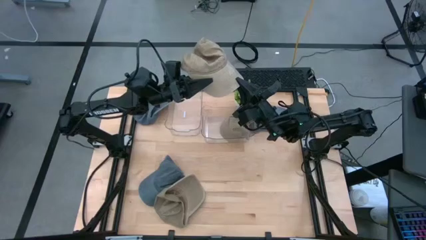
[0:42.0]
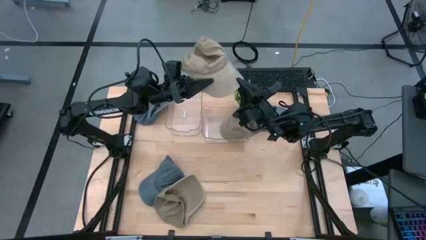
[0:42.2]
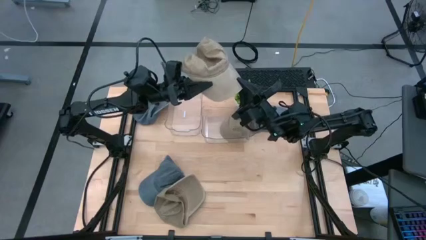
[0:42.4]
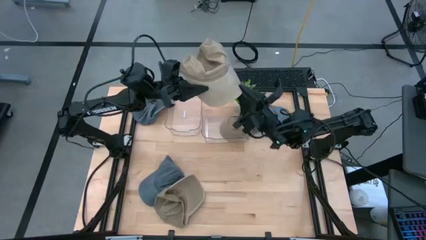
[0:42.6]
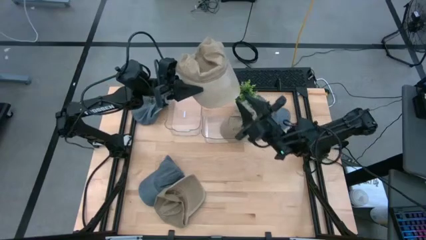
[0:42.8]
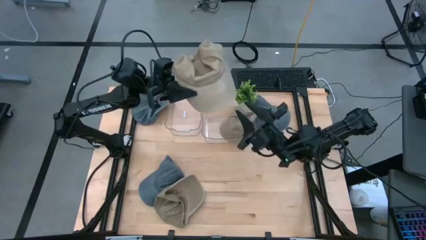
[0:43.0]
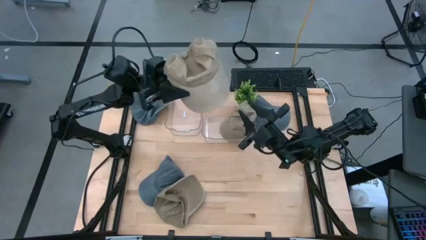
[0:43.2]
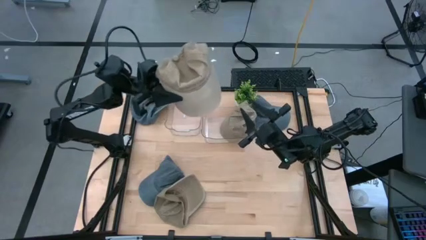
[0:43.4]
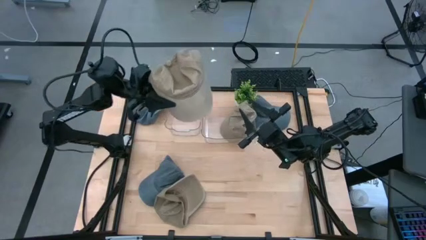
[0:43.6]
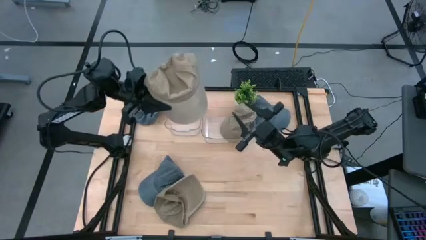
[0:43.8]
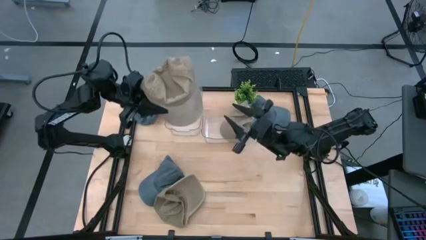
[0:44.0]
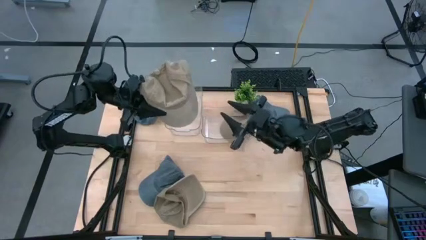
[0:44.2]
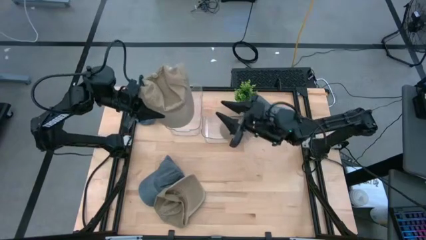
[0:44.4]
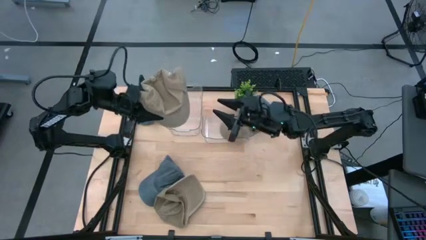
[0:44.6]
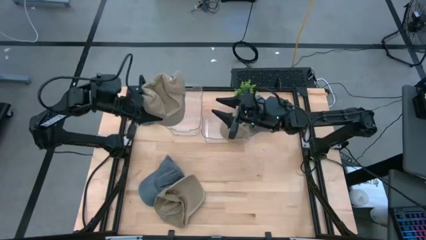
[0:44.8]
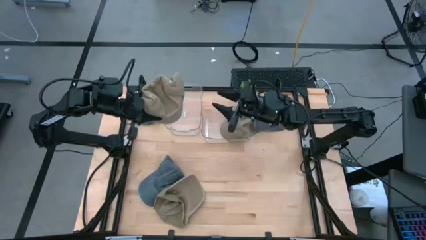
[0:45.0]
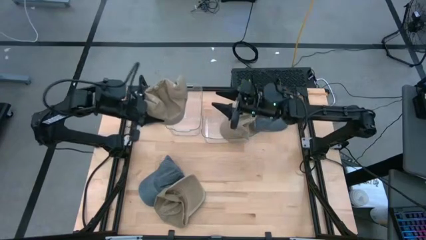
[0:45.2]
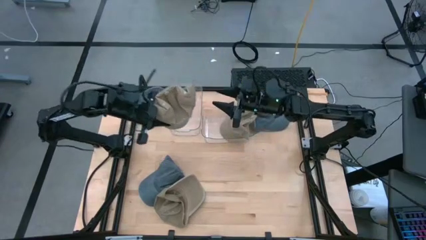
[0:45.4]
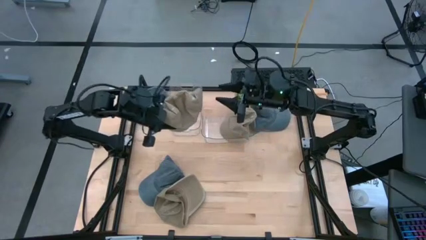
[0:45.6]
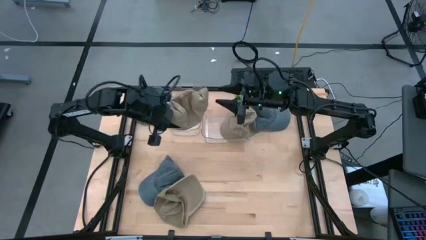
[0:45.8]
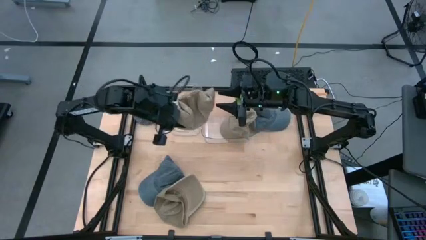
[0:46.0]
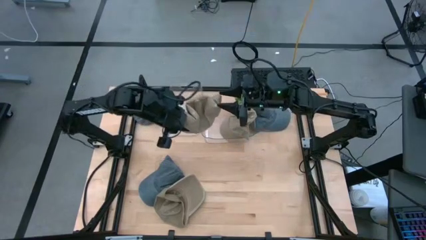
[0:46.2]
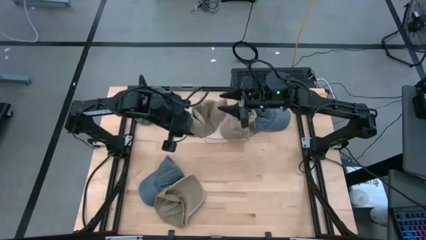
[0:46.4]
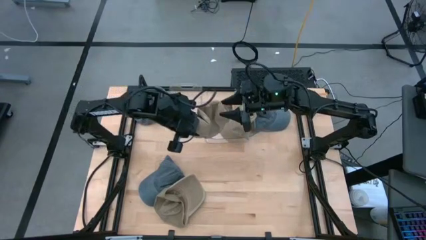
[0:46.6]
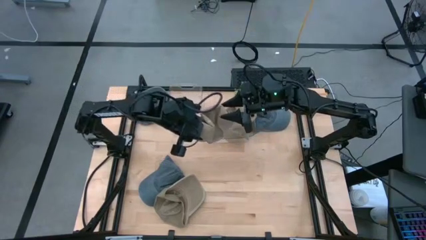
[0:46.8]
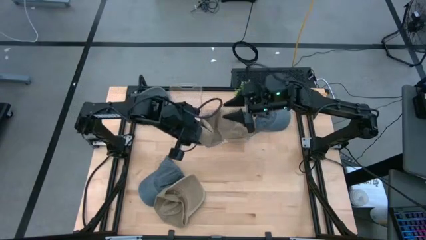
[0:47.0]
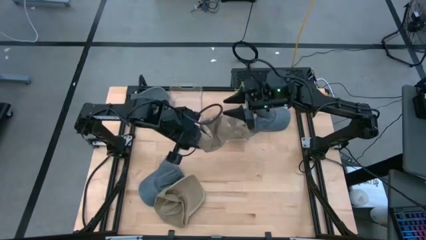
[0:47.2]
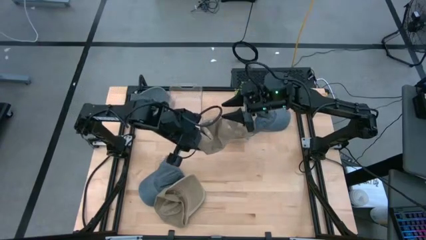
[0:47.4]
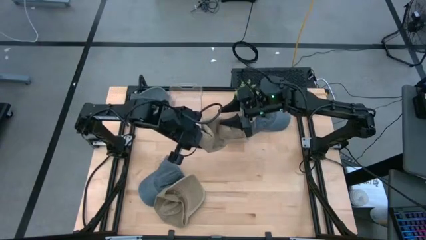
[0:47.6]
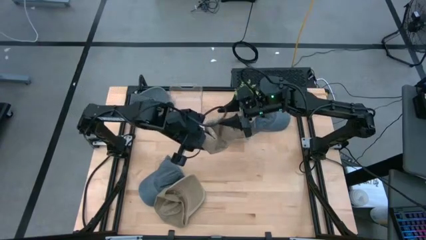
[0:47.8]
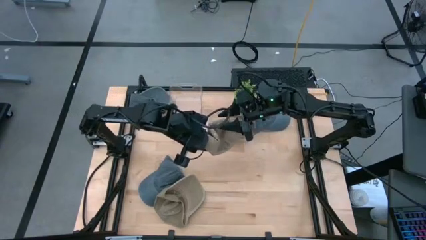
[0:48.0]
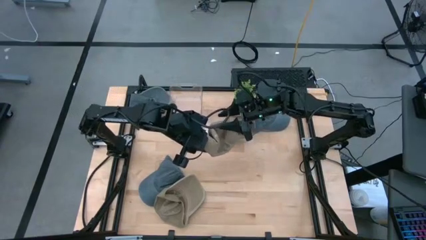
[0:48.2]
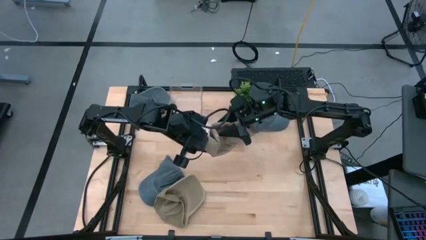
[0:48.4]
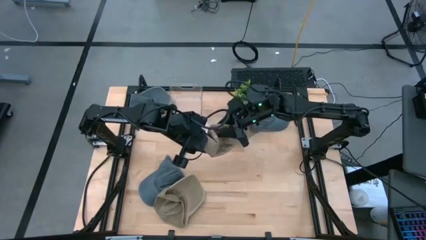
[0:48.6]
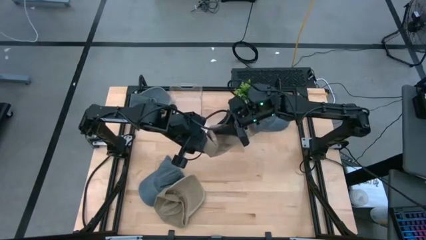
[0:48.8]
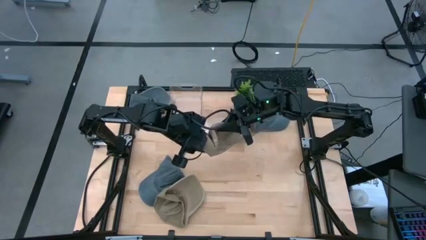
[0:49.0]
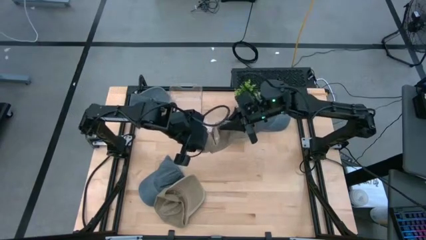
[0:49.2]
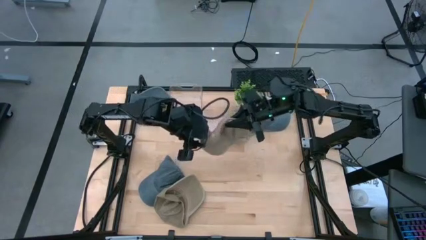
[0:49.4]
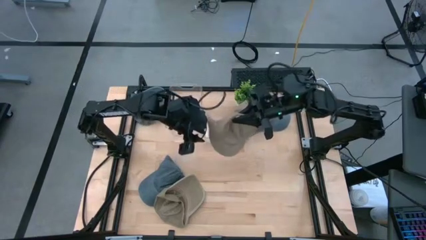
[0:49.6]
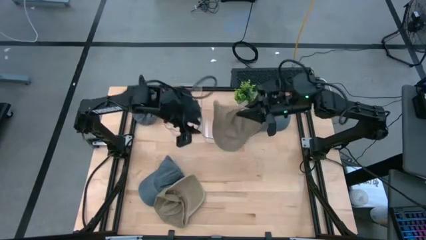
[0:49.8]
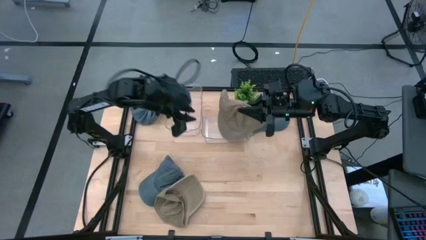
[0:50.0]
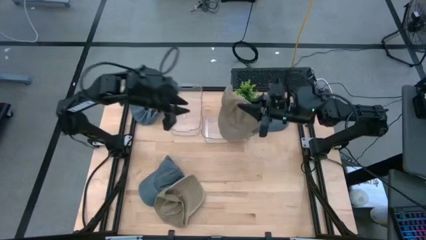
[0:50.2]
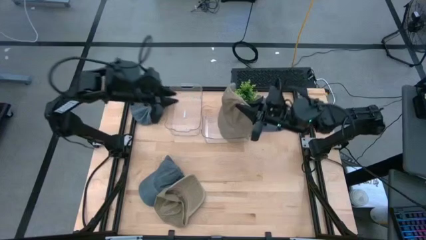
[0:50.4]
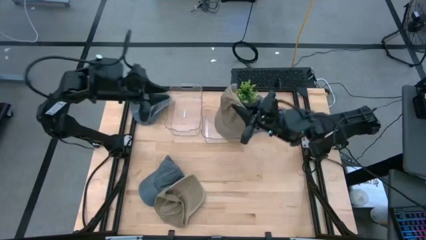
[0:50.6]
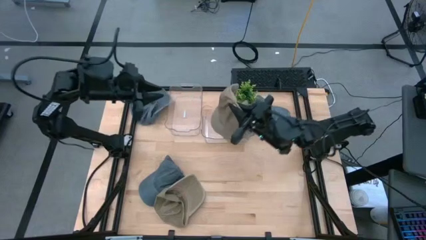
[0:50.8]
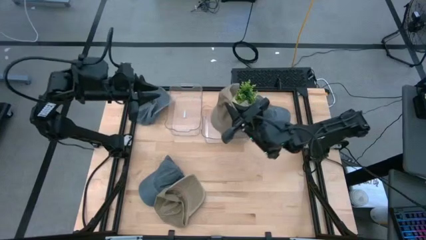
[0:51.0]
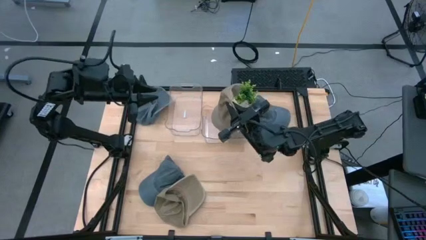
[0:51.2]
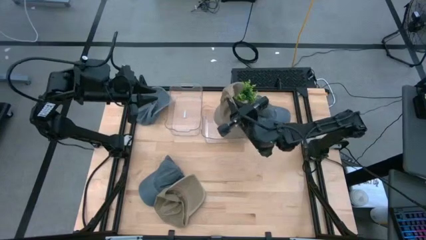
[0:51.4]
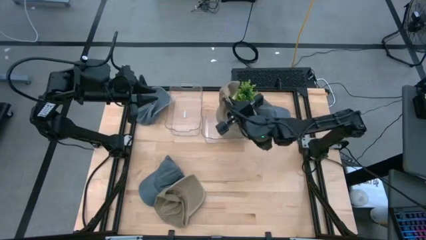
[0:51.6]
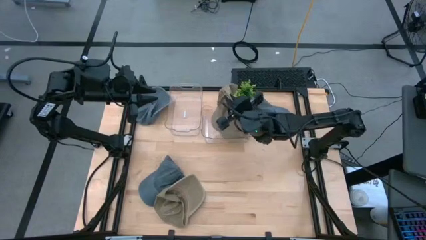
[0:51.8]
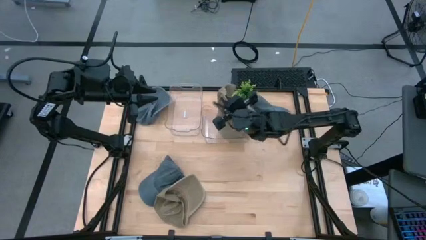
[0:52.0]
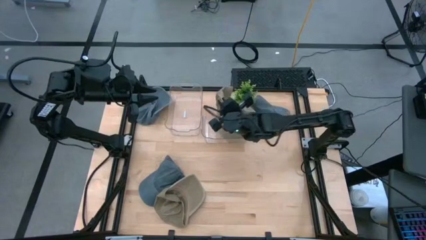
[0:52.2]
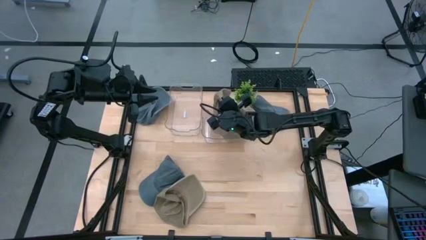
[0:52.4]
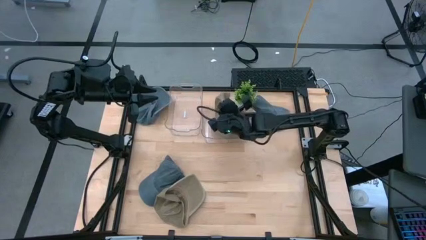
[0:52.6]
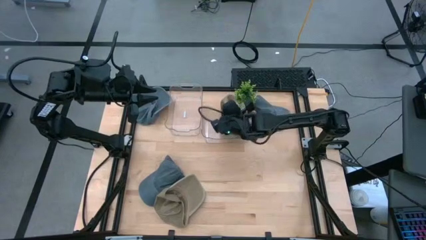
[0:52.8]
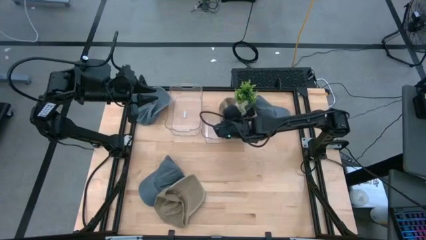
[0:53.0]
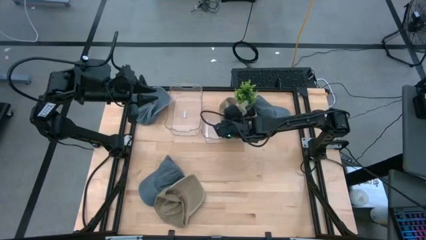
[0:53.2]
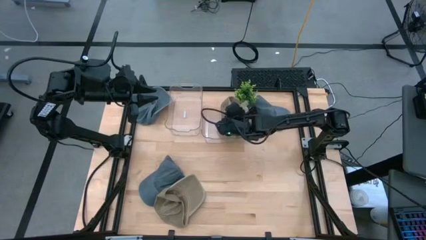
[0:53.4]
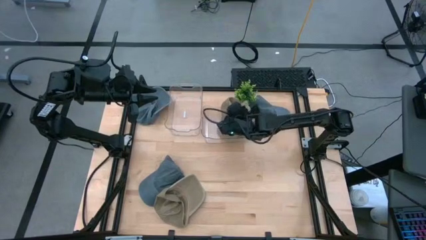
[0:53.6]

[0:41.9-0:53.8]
Task: Pick & Place hat
Put the top brown cap into the right transparent bin
